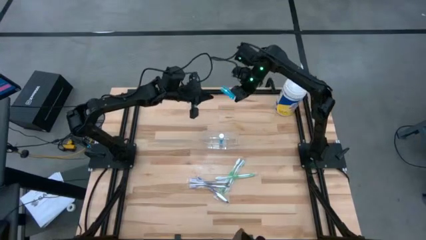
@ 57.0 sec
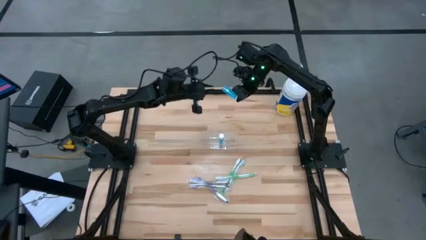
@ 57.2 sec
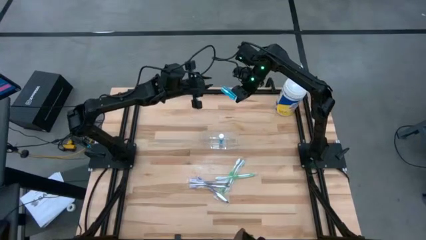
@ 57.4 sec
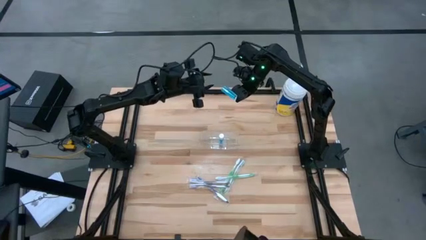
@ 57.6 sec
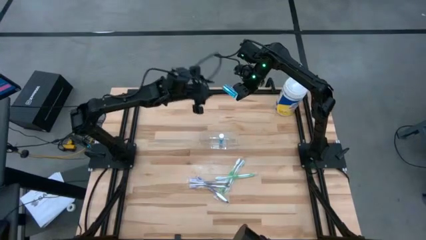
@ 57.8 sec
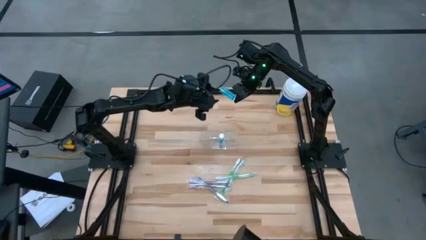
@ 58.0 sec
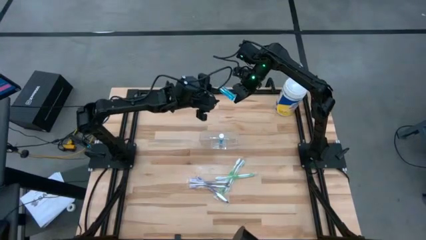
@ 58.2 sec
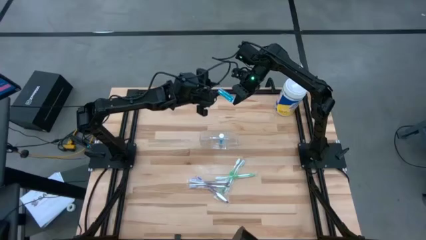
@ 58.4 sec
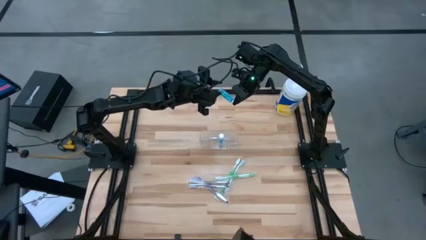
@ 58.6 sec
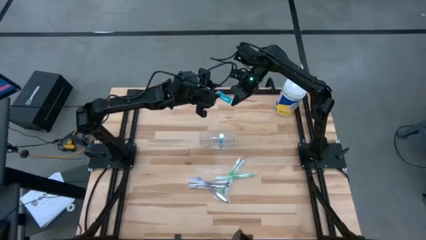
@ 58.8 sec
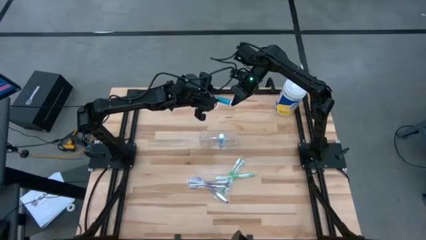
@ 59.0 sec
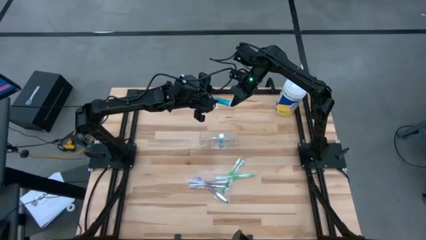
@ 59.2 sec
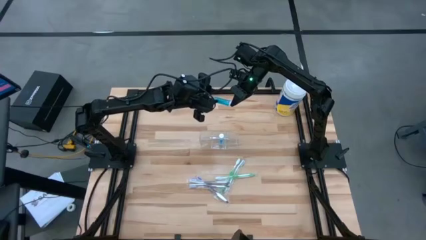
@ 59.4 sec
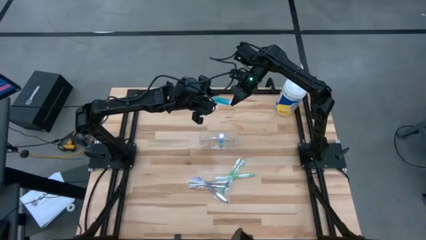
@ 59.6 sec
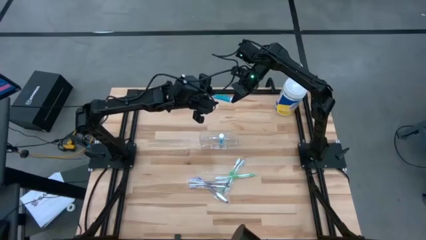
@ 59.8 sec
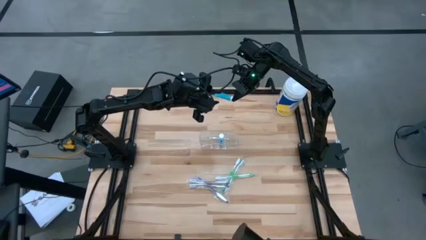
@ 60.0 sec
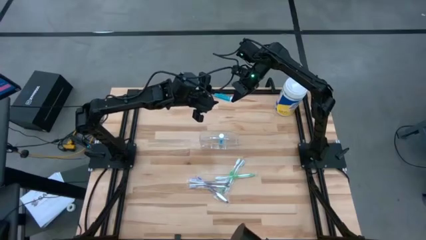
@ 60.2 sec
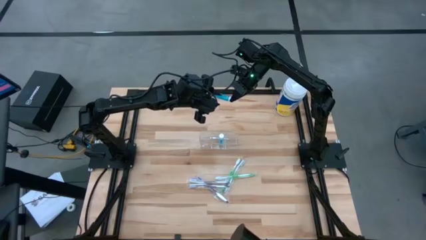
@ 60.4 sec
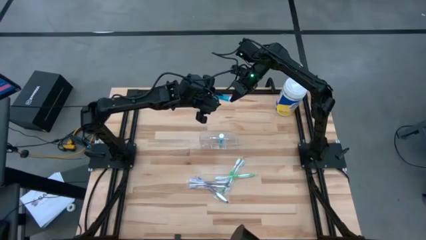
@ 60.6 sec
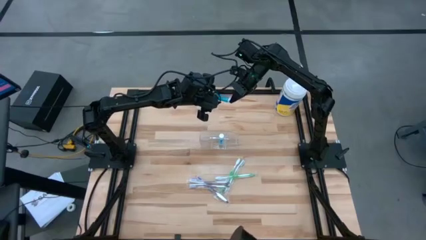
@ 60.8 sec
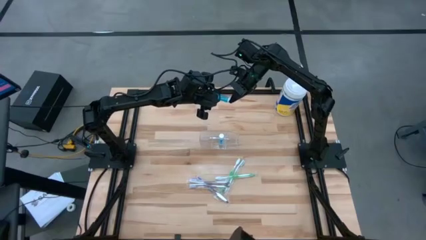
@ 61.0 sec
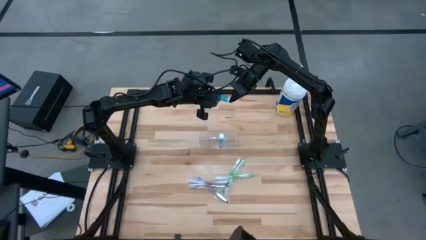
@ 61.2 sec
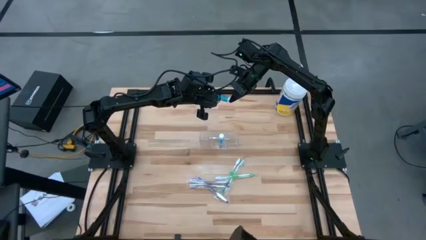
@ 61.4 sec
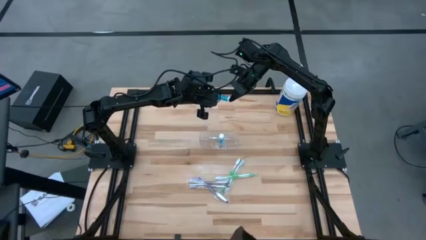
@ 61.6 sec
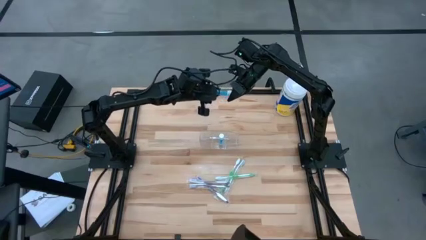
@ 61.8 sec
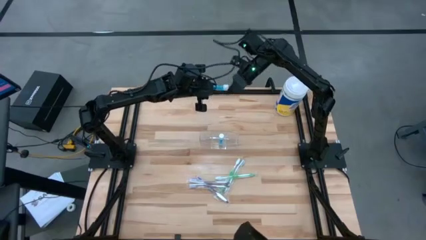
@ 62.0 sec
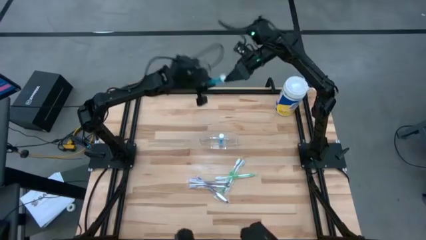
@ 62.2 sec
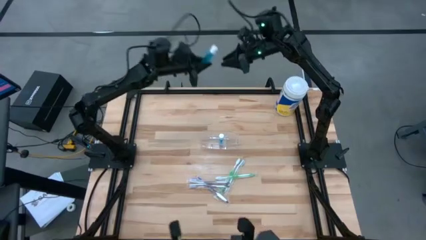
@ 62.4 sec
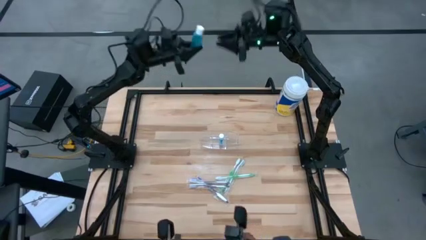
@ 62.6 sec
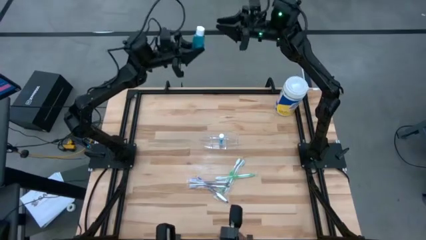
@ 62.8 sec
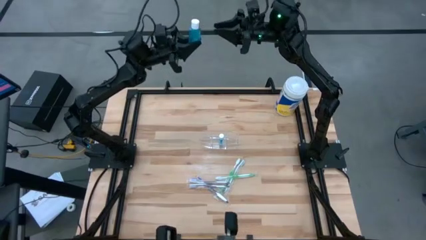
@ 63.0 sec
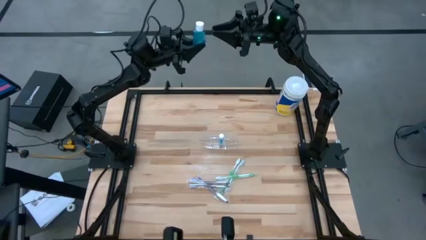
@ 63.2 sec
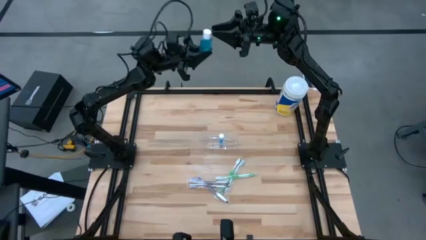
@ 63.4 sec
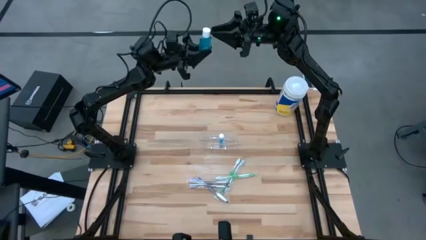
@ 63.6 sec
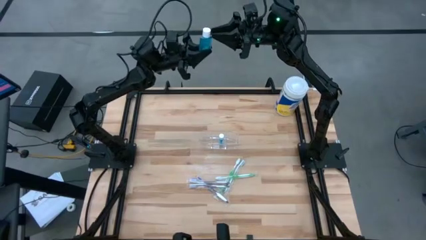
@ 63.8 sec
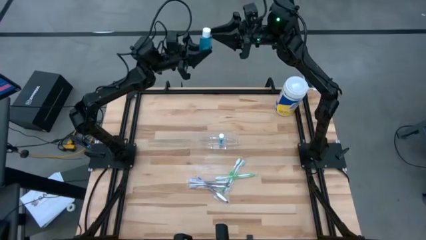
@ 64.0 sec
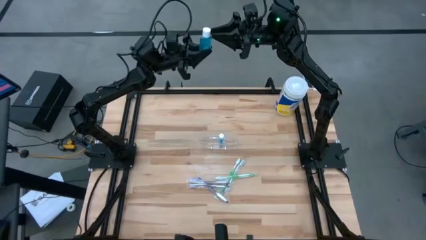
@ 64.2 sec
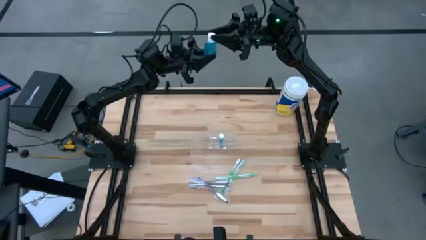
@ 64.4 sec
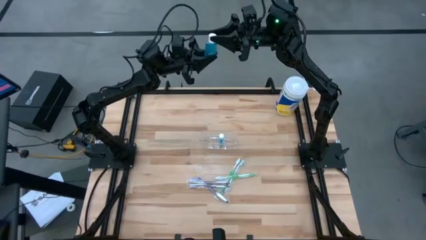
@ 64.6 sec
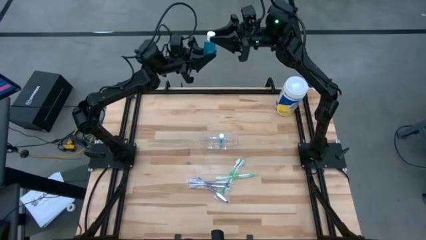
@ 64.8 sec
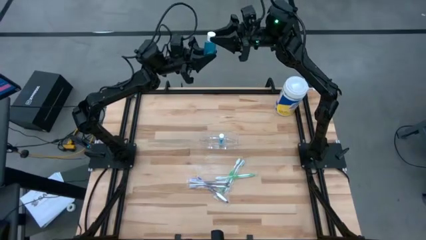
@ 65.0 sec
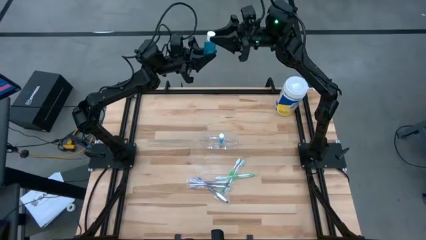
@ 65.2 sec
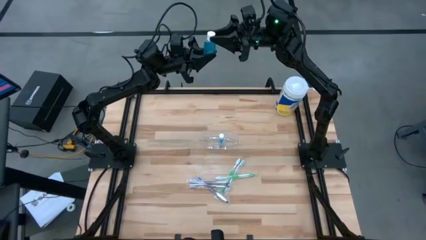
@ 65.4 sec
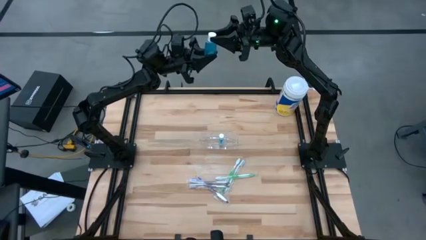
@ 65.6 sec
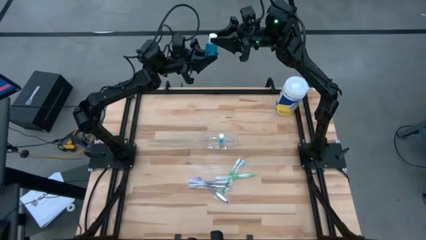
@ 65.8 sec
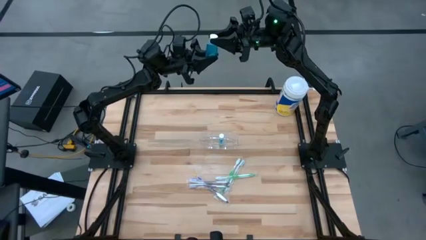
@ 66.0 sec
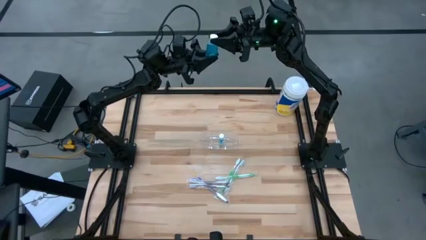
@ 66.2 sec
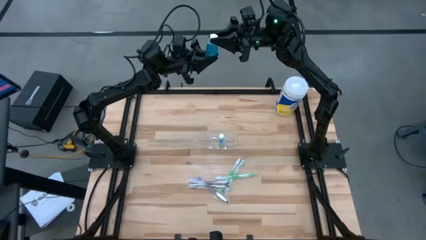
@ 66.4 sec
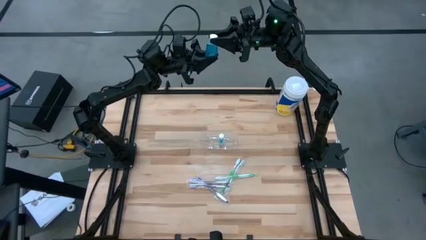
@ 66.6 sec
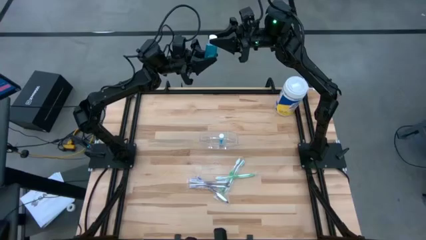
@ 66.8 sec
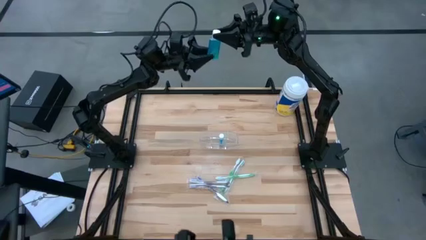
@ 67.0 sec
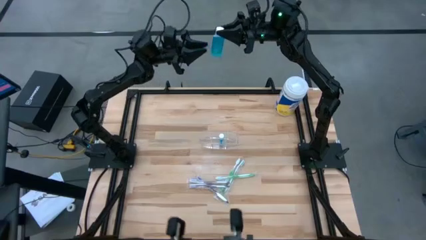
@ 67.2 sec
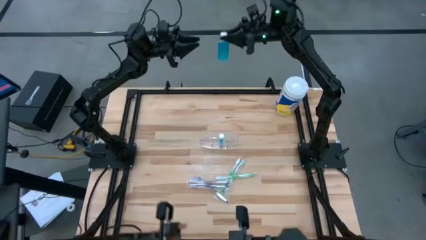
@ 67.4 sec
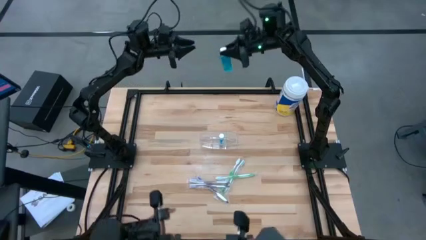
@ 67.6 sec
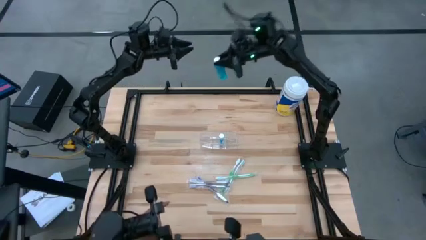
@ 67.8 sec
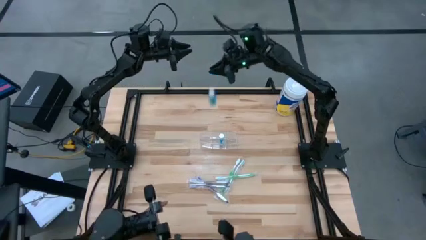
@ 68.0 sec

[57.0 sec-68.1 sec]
Task: Pick & Place toothbrushing station
Put the blue mouthwash bottle into the transparent organizer
